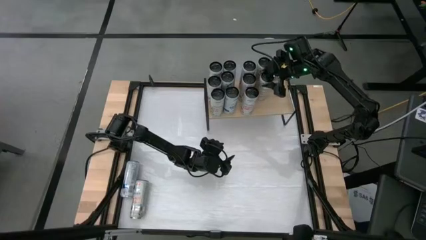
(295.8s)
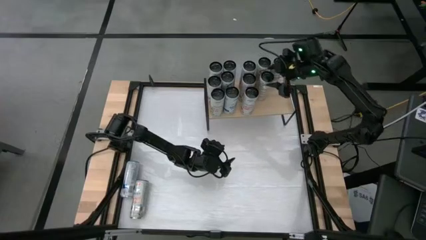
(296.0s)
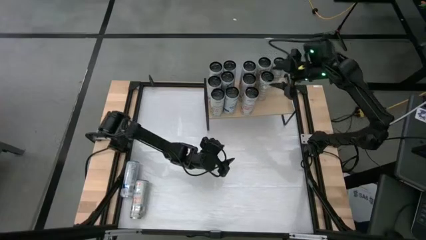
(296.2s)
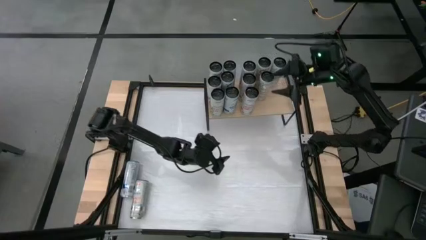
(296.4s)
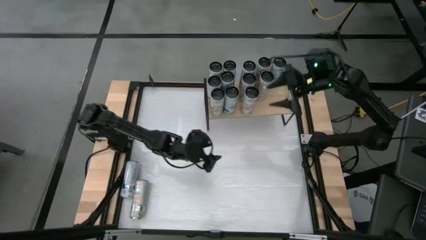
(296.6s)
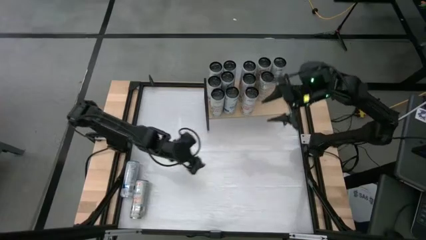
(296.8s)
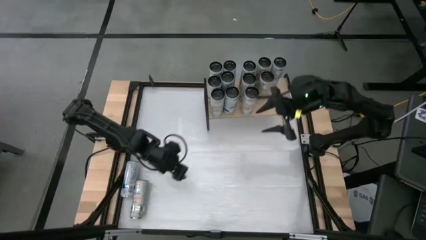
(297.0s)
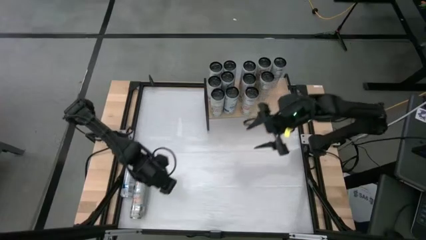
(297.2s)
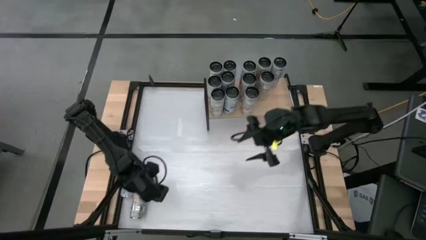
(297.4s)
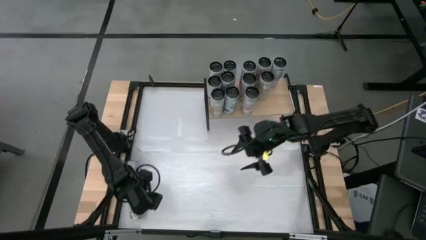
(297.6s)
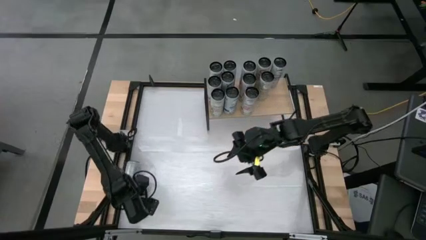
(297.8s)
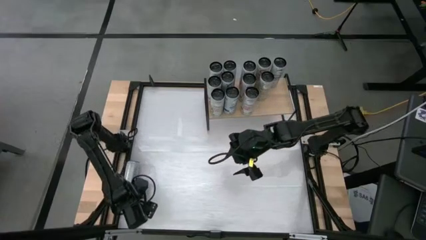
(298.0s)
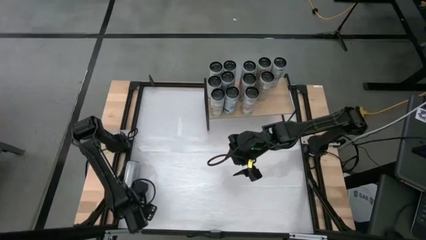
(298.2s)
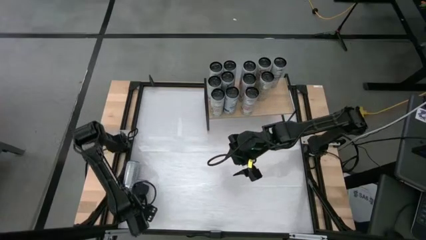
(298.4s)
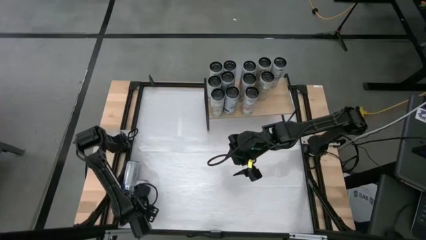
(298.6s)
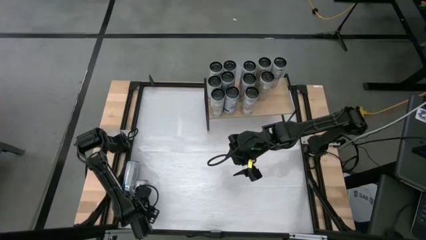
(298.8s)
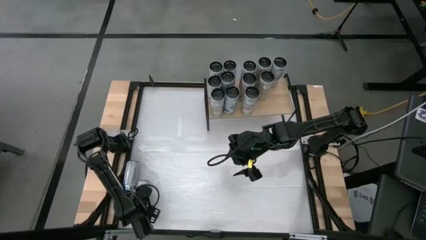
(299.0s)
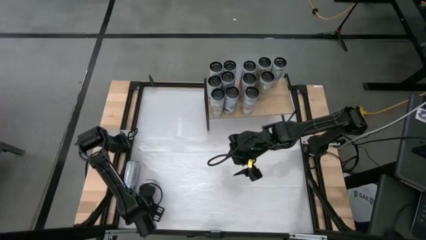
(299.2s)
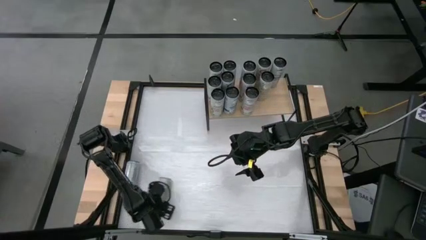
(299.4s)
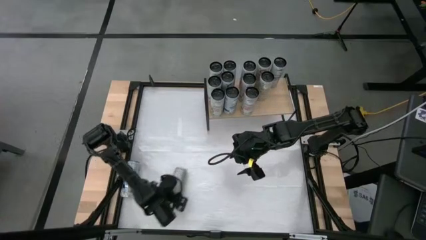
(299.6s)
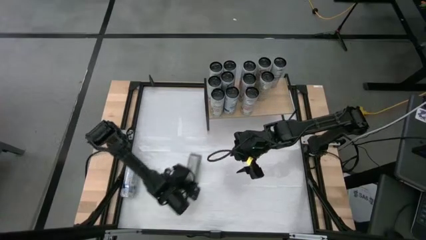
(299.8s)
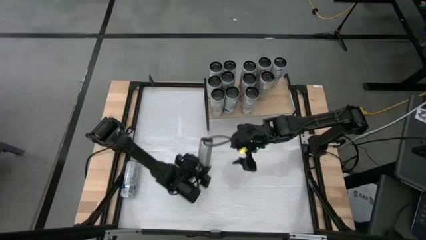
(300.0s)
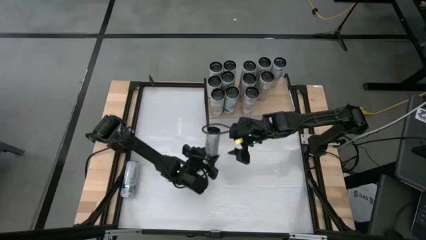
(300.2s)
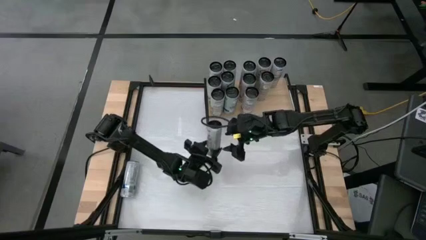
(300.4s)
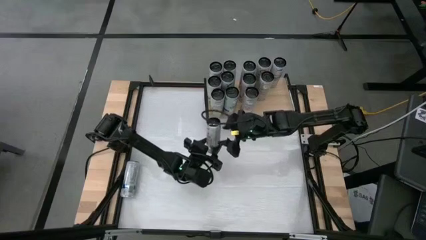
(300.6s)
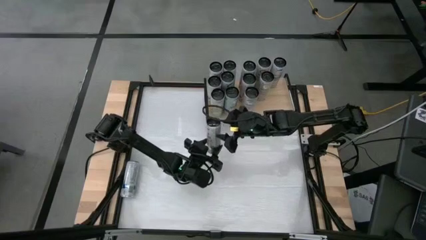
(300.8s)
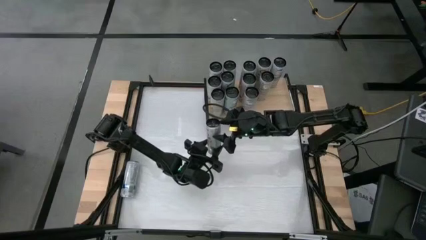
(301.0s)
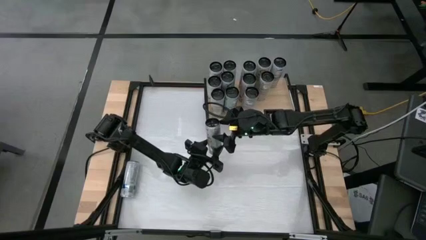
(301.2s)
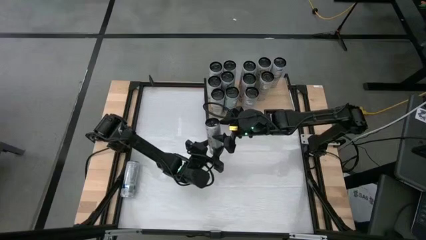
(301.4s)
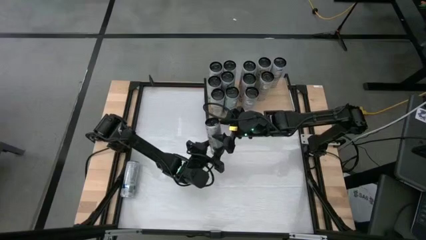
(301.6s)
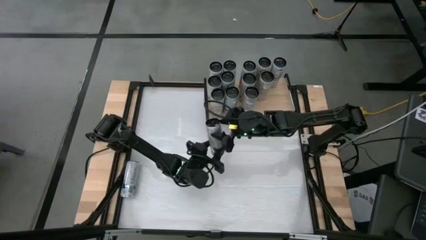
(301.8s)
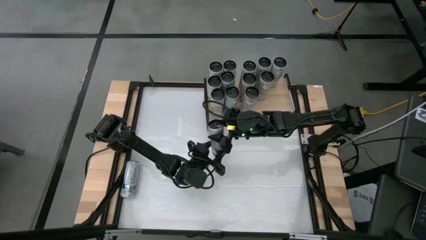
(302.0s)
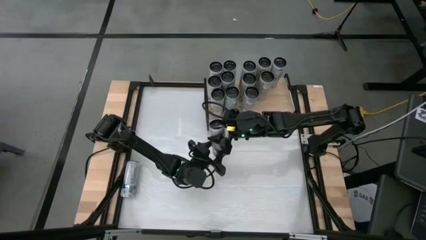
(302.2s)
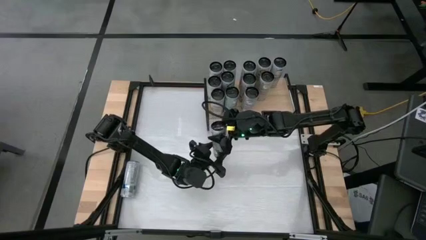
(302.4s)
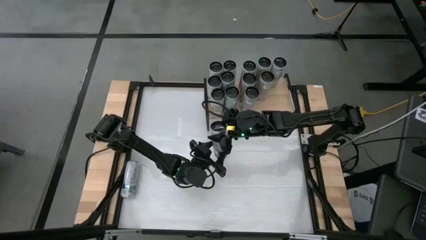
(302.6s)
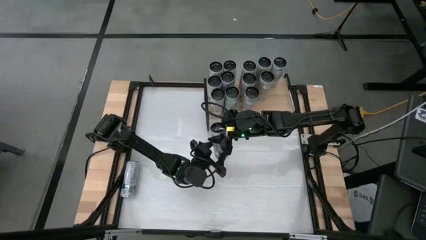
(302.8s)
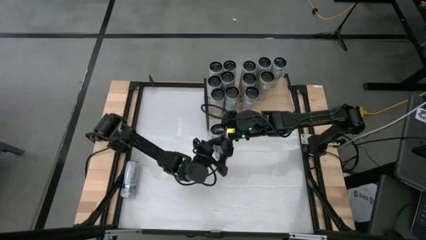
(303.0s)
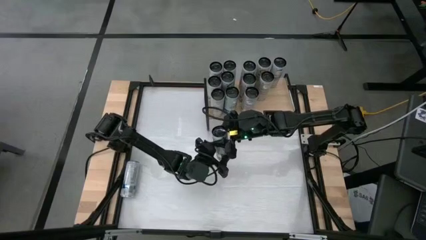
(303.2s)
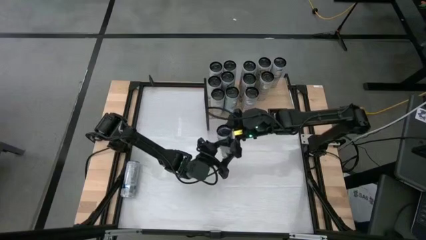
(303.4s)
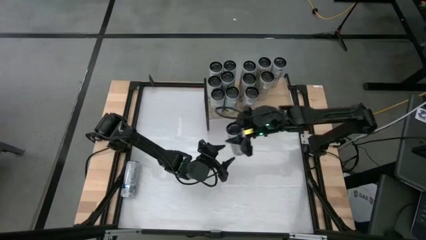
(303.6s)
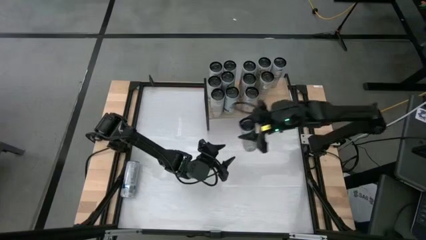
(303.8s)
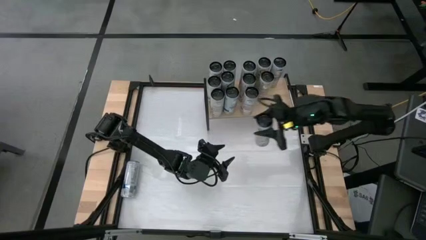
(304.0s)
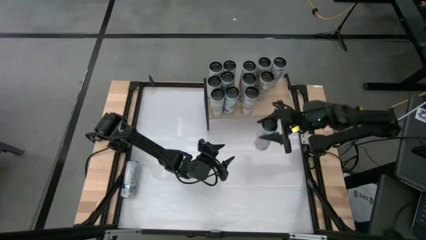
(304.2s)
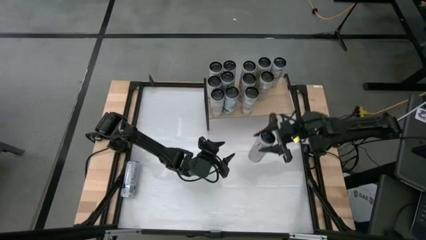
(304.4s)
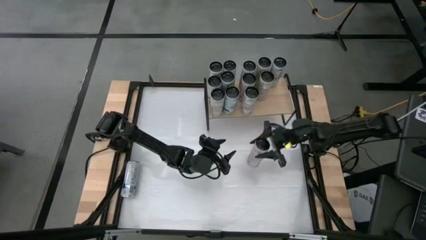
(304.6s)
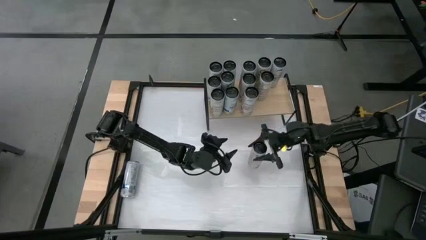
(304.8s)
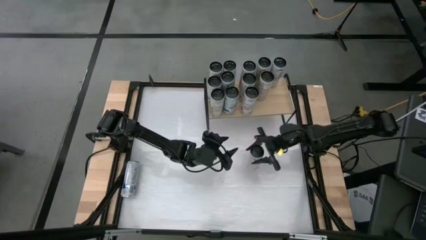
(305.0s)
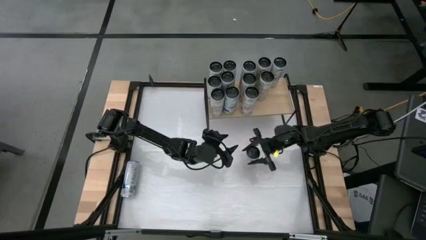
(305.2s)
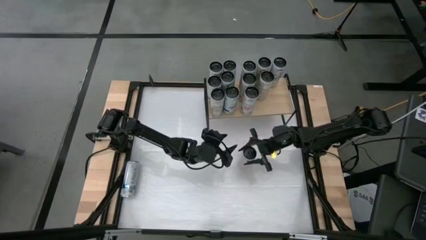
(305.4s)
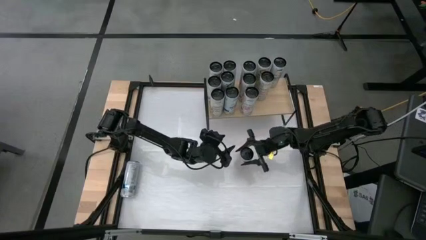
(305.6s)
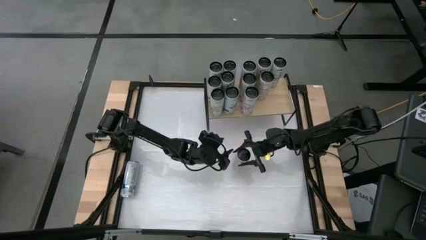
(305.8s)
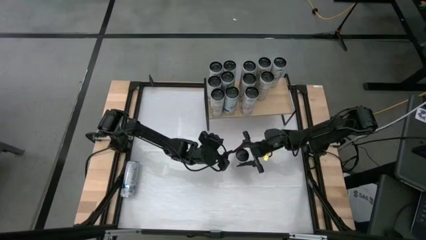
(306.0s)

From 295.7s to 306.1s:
Task: Place canned beverage on shelf
Put the orange soda can on the shelf aligned with the orange soda cans

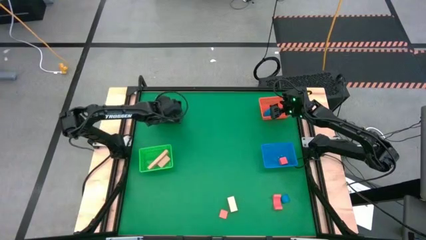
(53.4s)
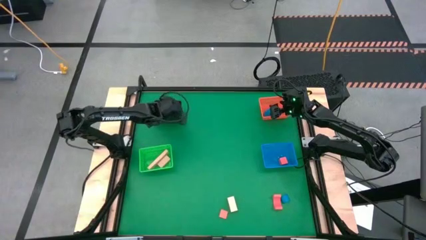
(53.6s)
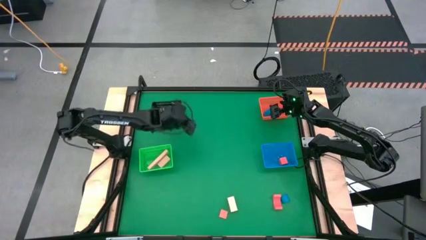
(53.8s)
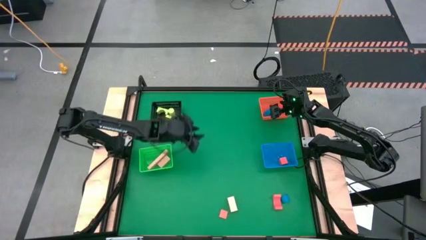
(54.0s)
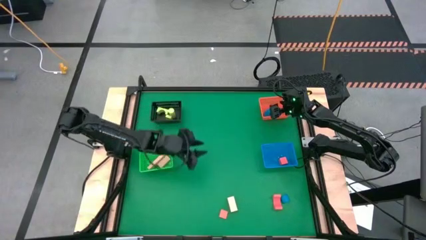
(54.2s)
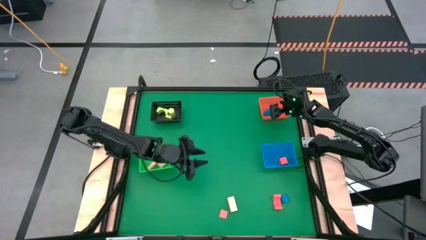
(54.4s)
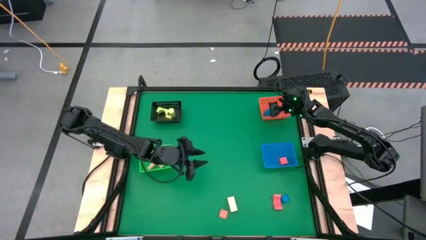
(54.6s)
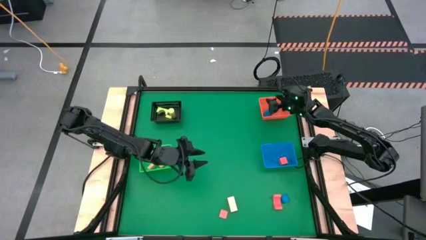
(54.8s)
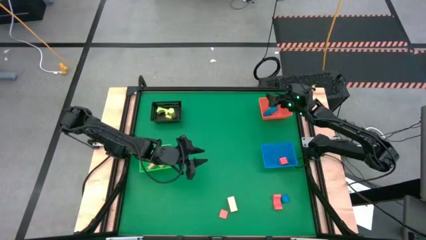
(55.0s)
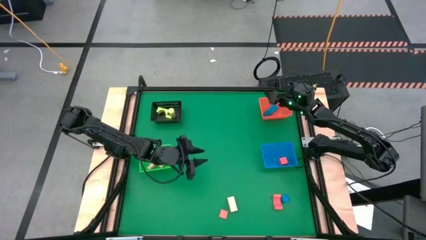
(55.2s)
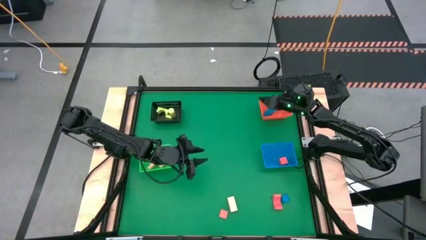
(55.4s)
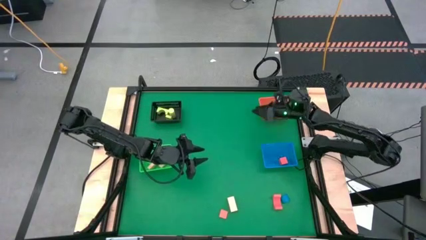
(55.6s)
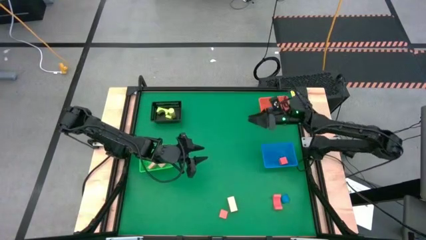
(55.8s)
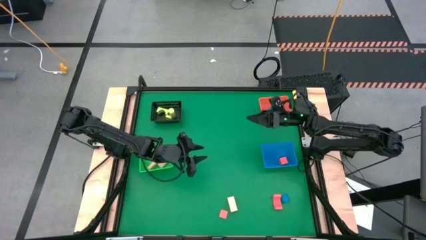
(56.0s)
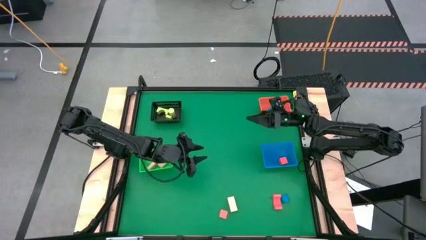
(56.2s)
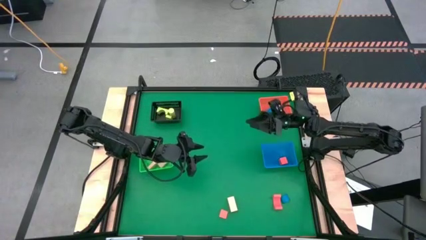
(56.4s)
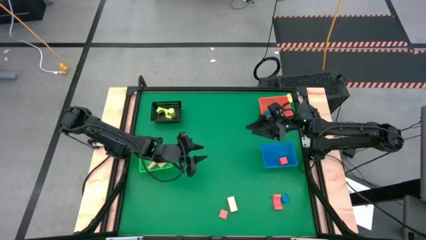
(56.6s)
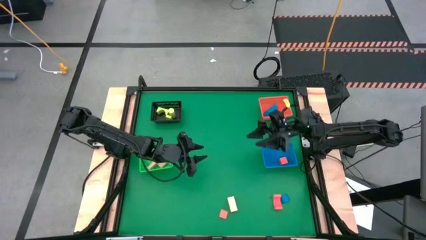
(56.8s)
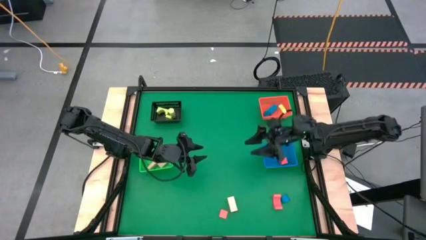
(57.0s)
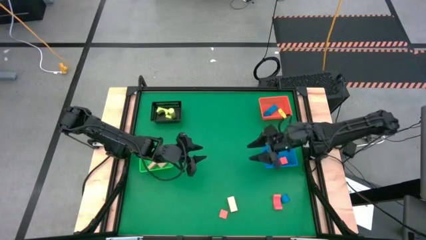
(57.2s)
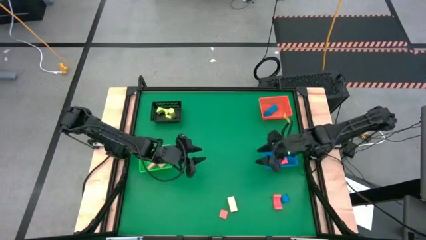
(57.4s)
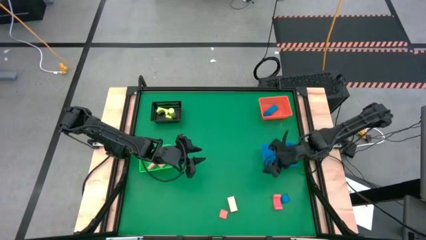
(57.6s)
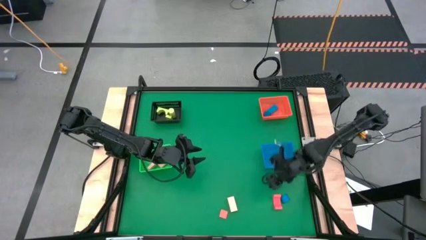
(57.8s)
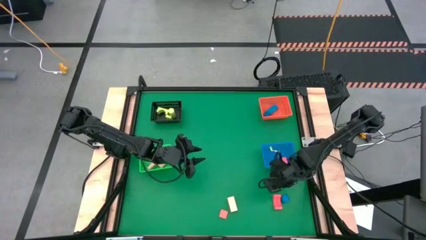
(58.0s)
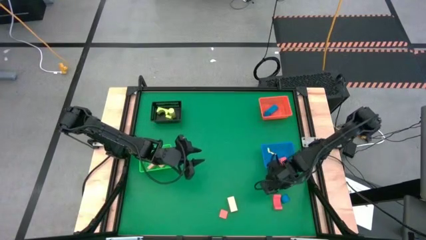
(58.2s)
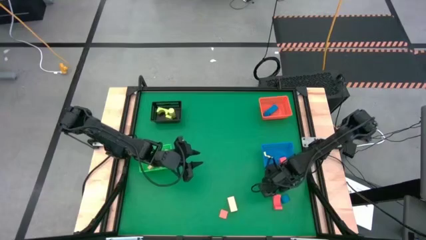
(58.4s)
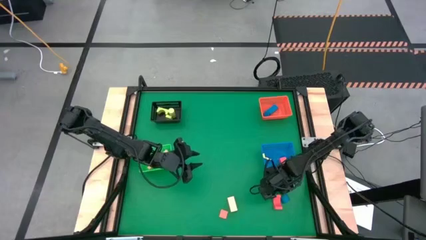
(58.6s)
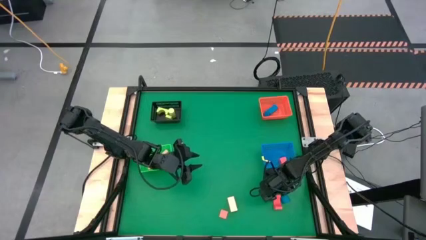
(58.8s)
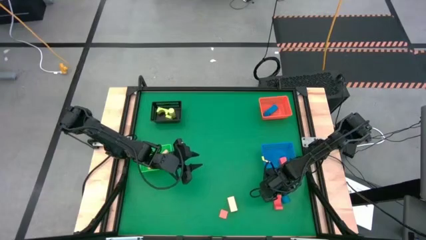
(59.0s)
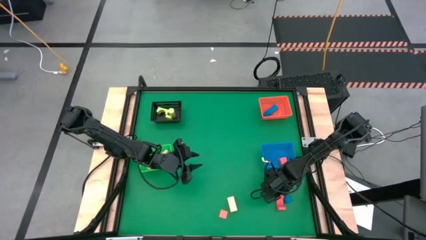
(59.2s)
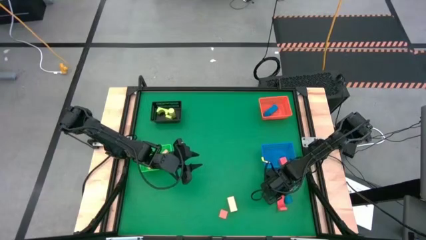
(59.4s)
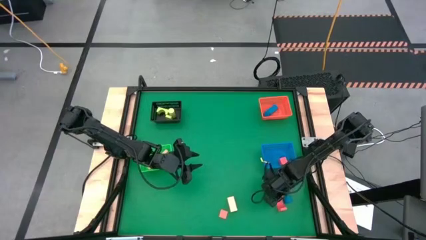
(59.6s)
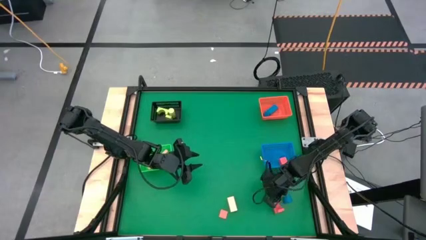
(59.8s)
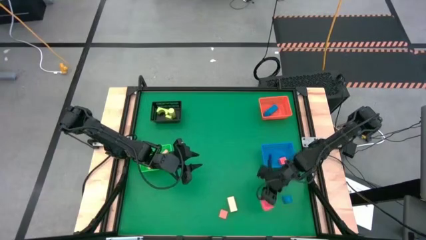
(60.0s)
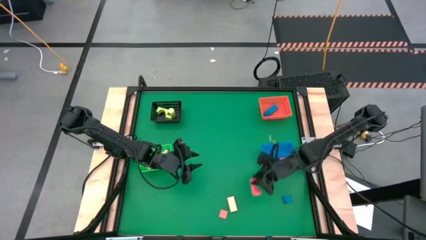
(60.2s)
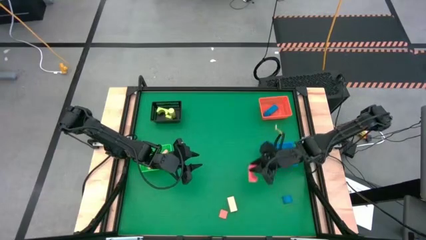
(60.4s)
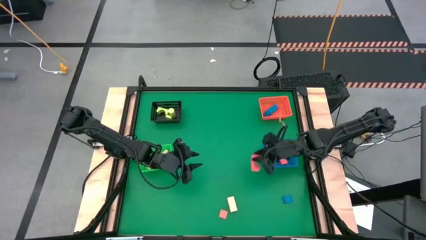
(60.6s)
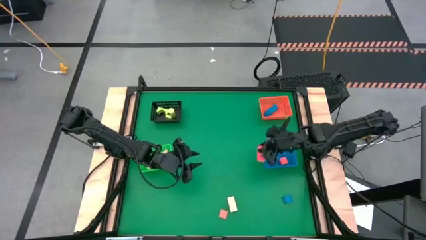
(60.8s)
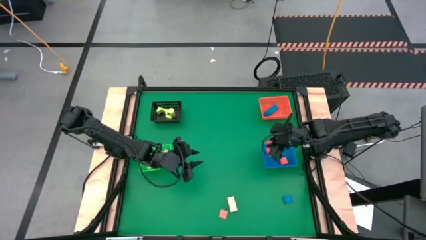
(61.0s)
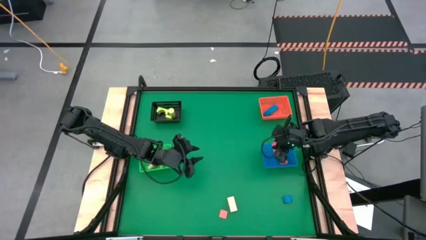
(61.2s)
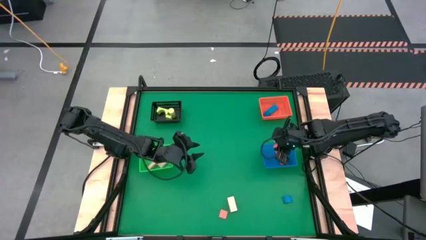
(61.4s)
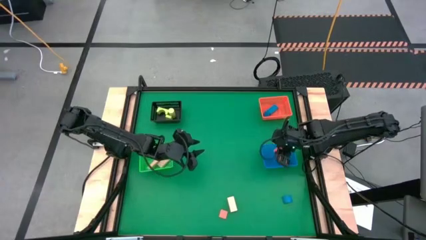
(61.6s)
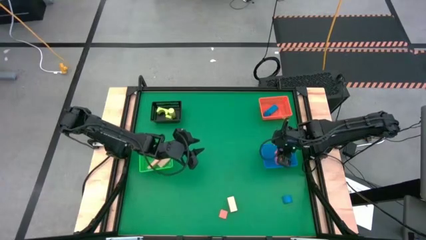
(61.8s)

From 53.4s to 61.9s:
Task: Sort & place blocks by color
Put the orange block into the blue bin
